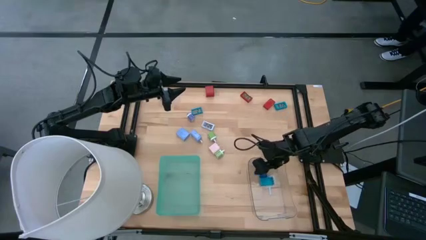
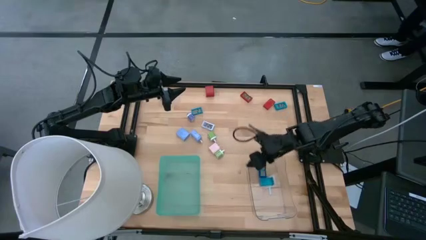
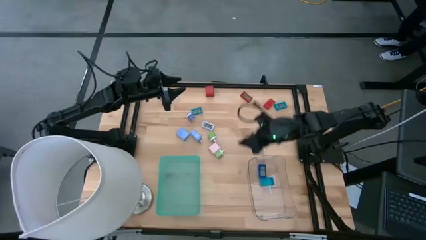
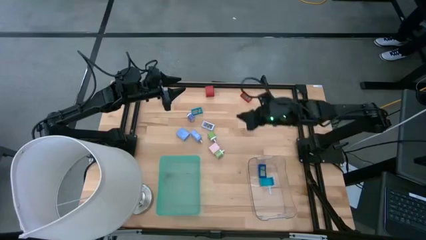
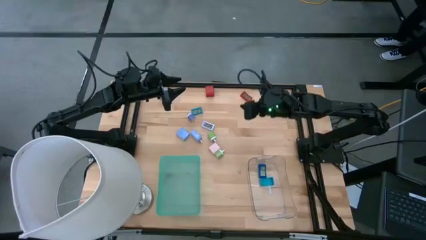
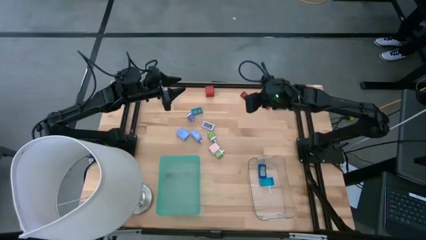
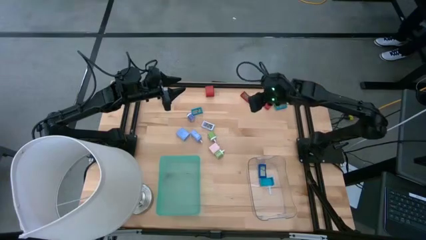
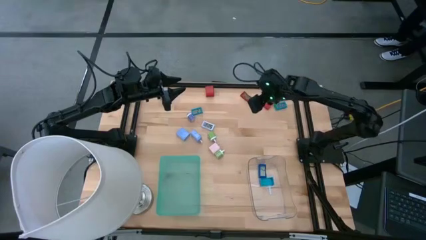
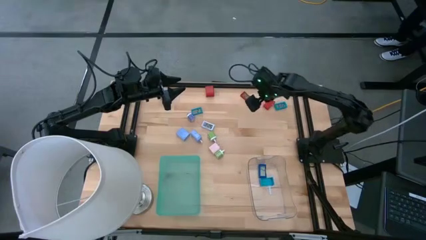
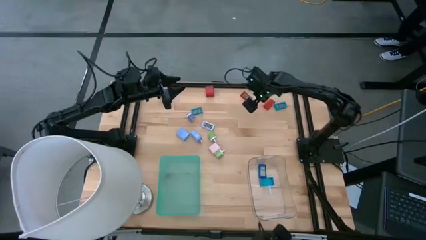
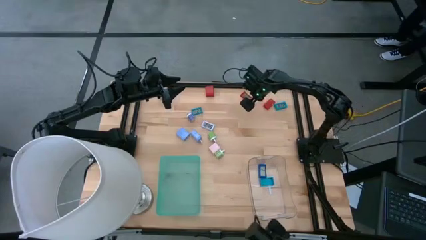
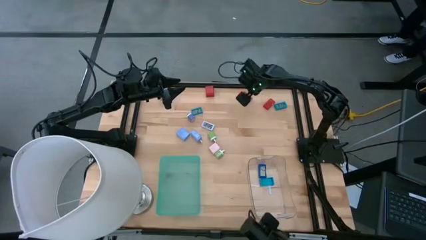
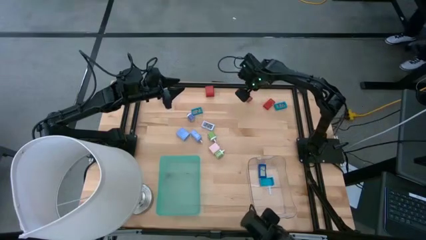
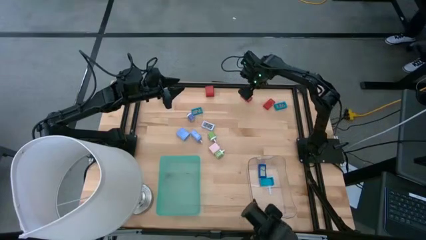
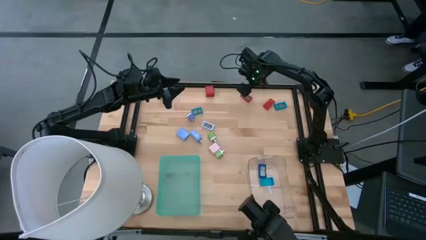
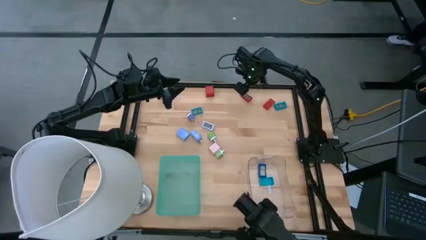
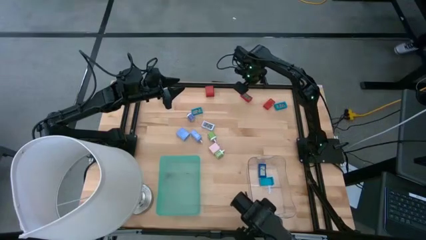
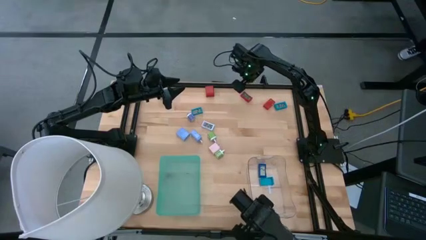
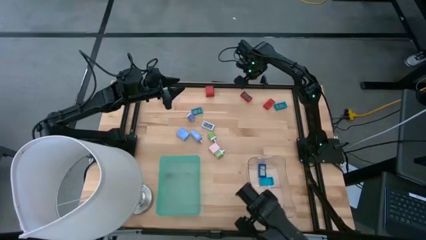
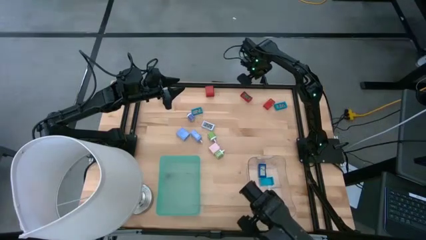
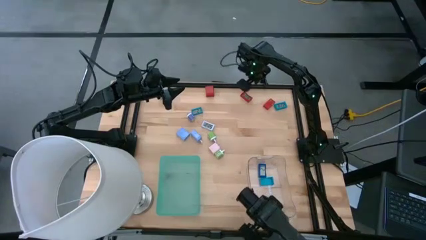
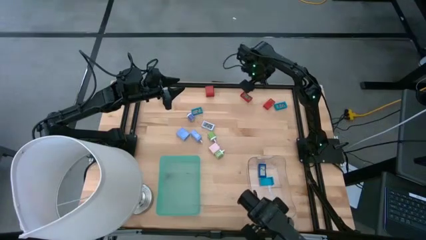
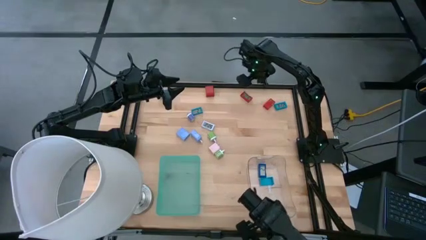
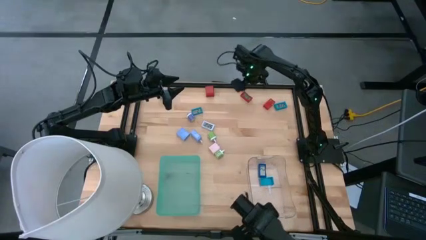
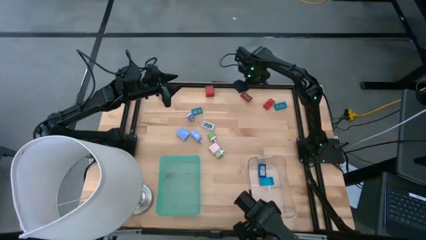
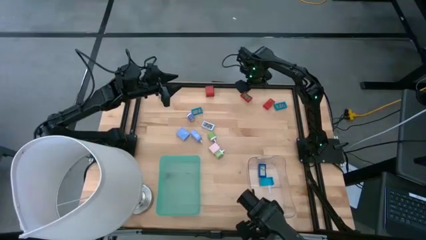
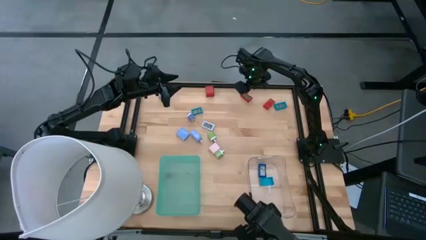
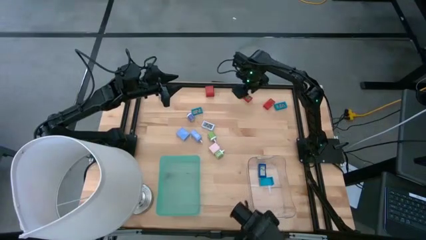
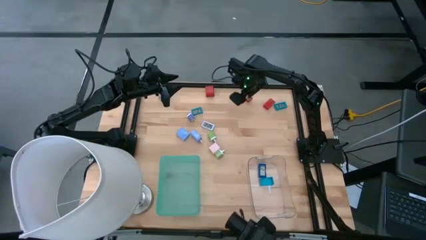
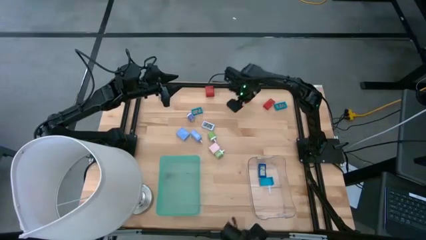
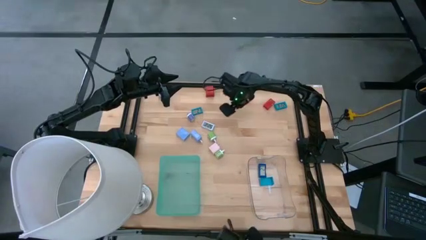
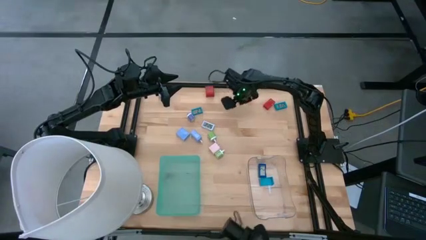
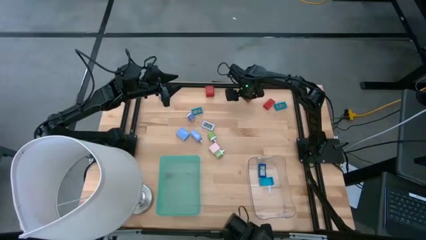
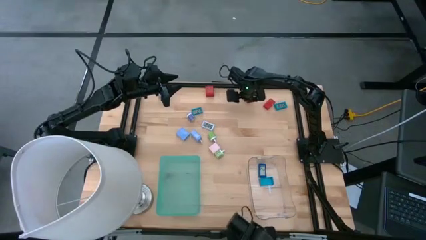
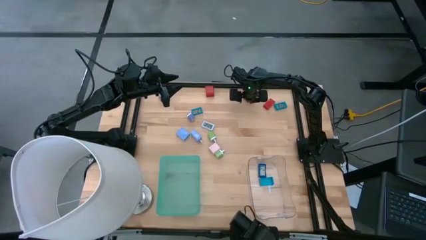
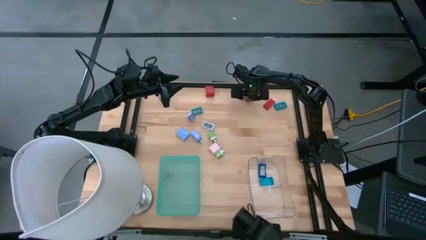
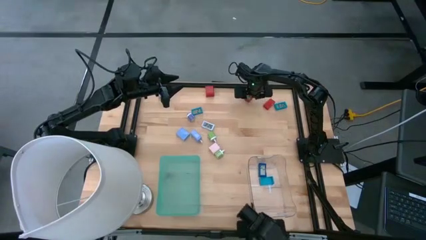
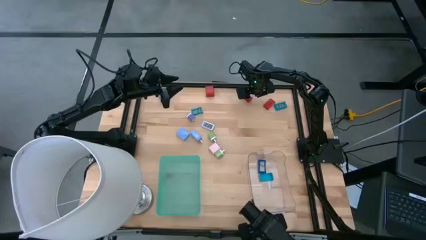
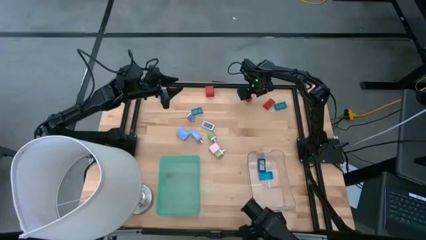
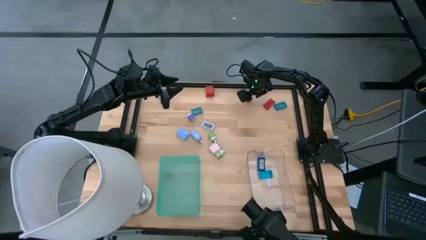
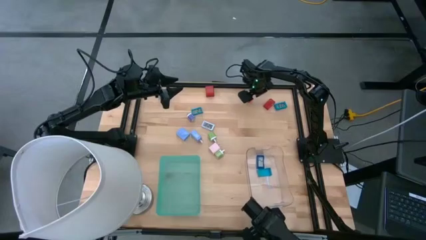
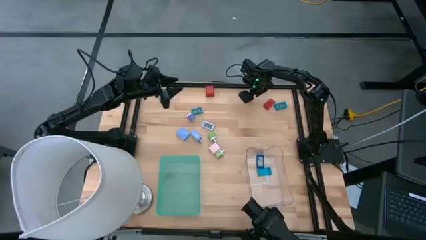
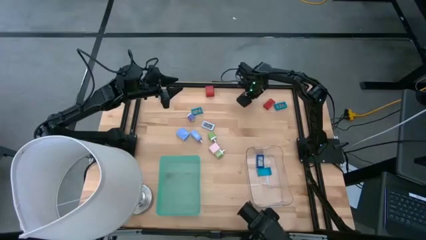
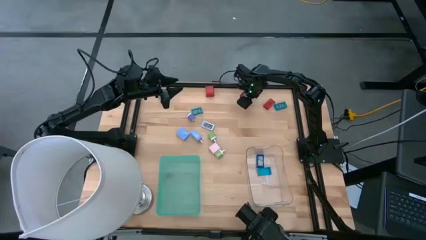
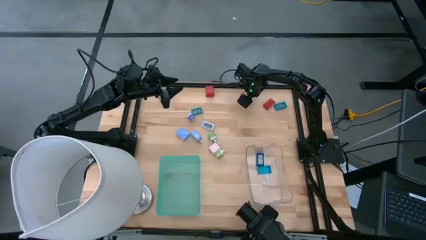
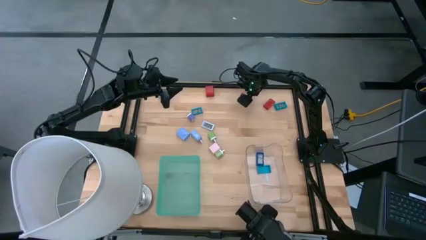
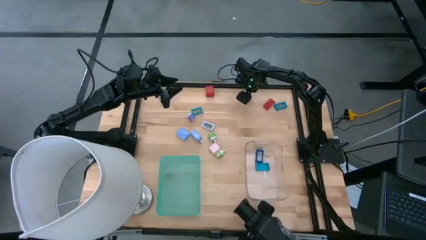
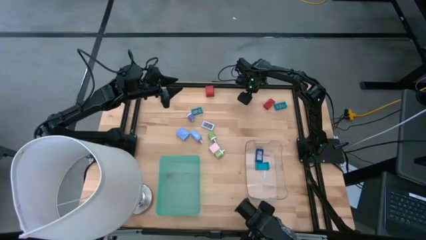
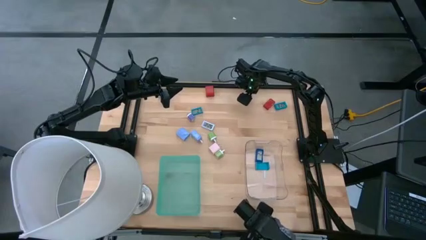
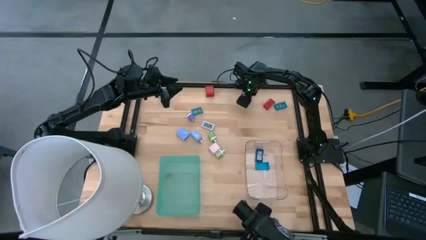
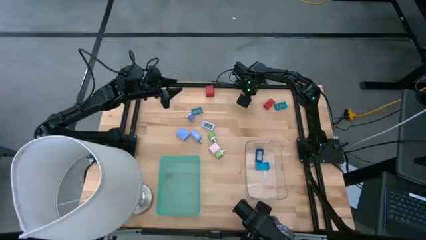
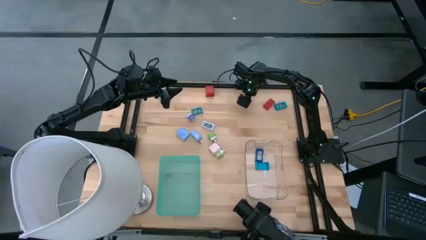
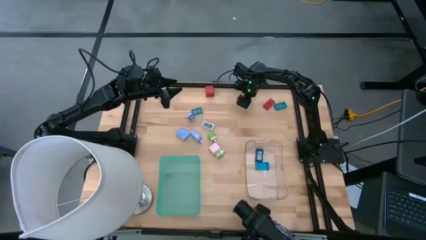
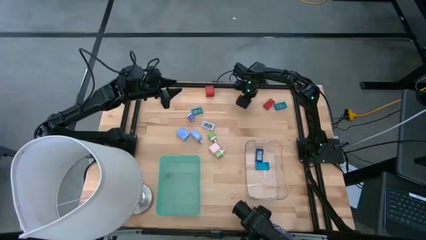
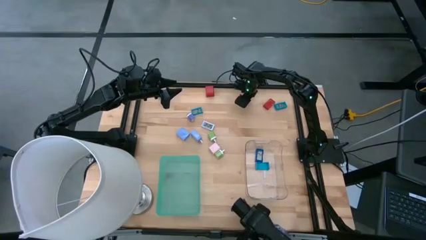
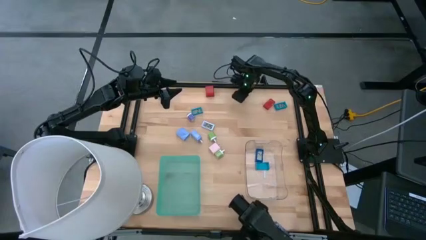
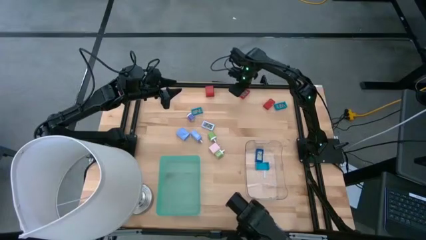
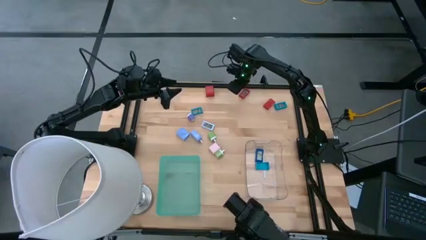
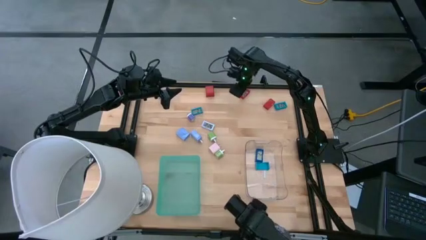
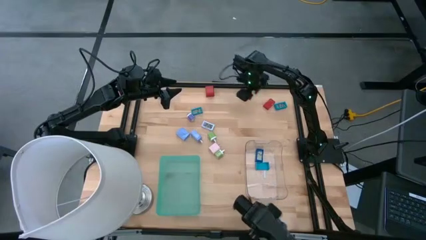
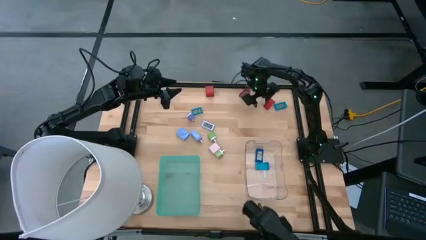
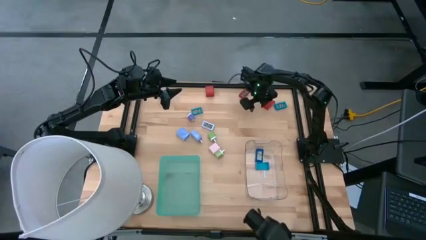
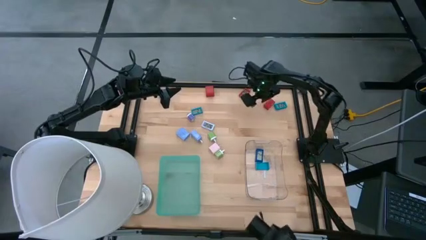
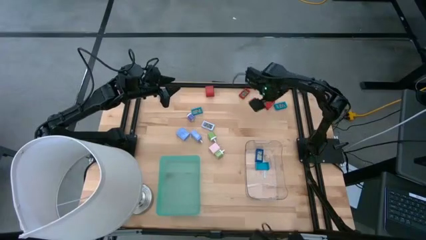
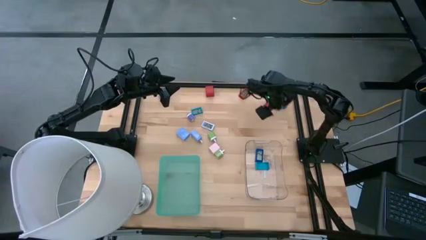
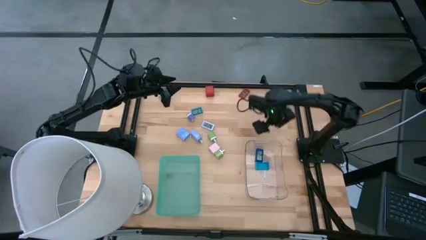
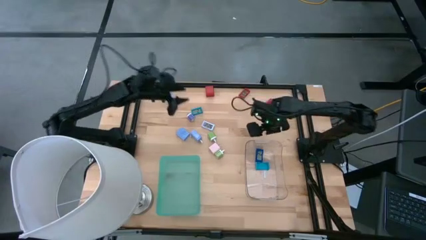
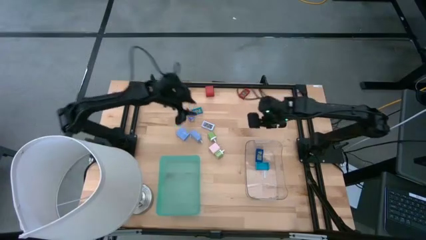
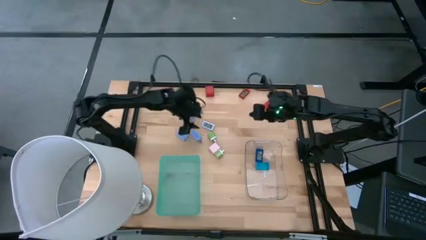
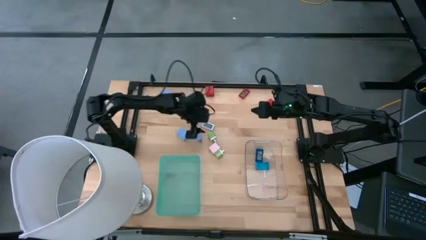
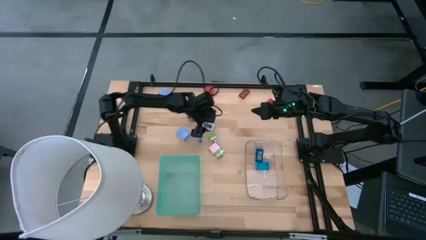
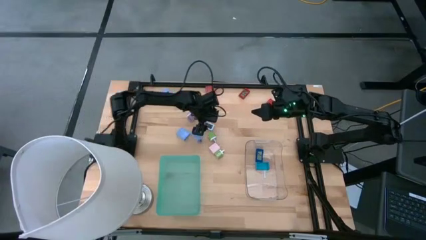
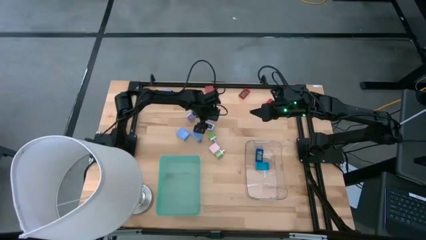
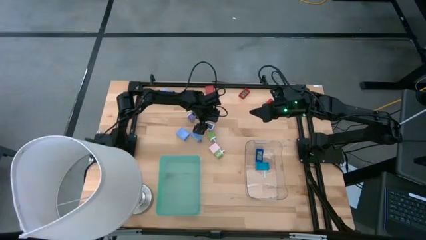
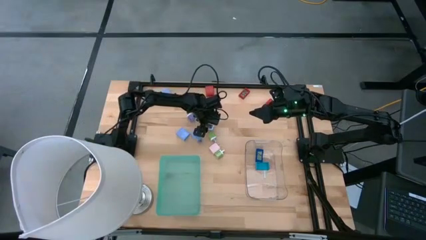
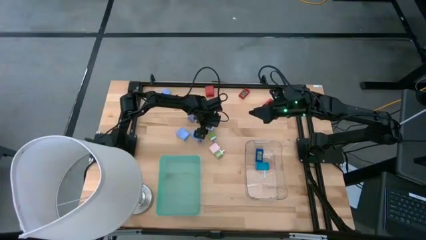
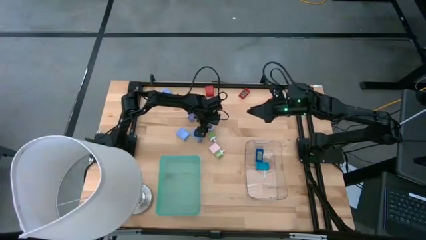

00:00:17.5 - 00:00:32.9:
Task: Pick & Place Office items
Put the left red digital clock into the transparent bin

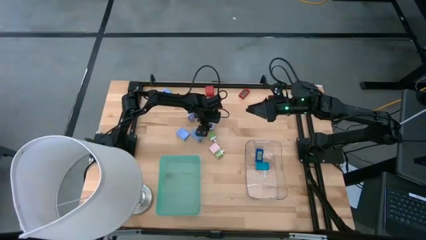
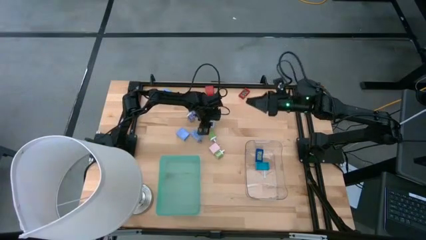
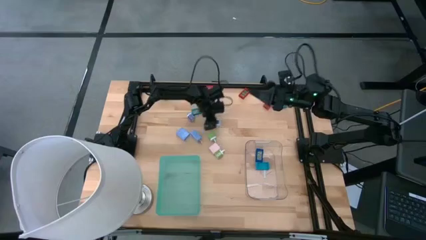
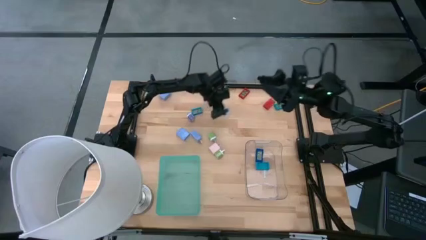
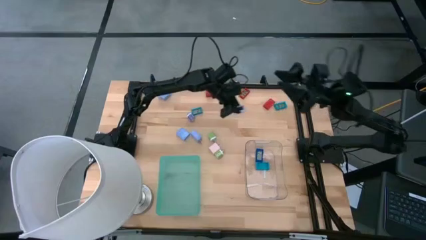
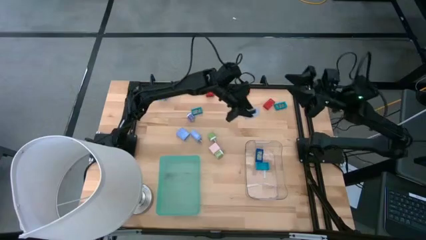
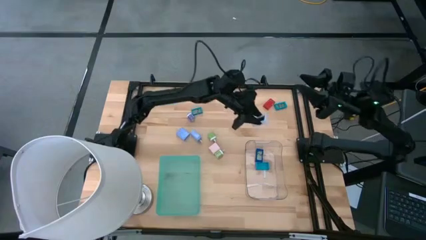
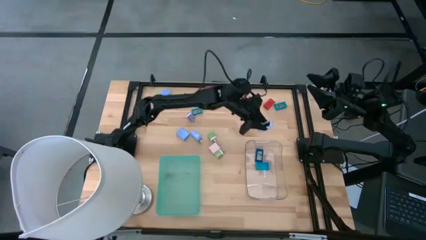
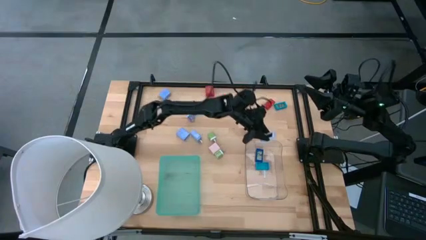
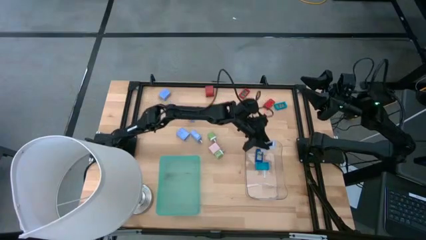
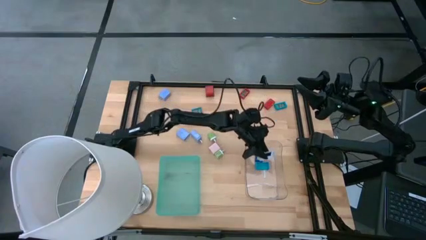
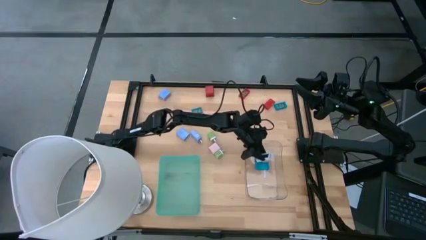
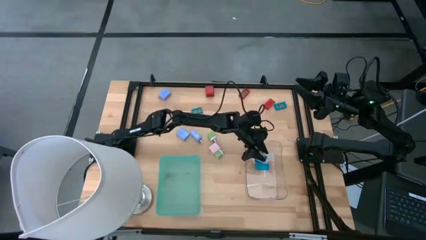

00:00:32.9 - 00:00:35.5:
Put the white digital clock into the transparent bin
